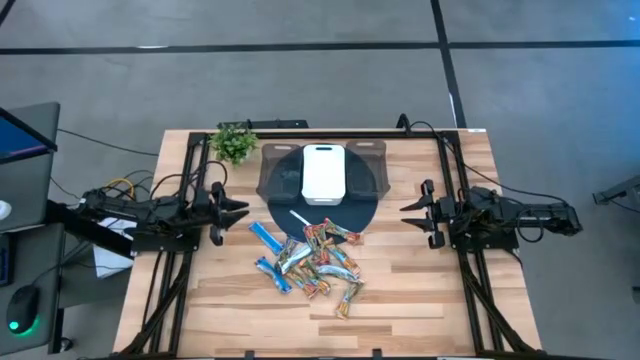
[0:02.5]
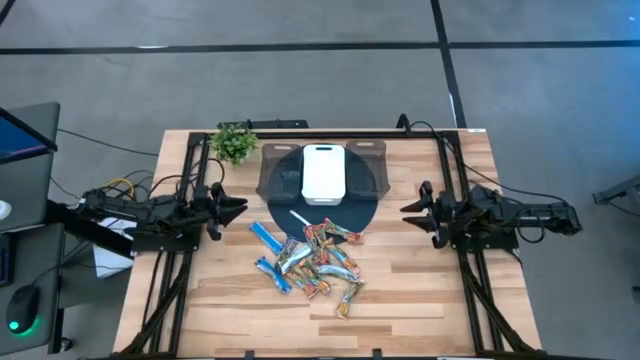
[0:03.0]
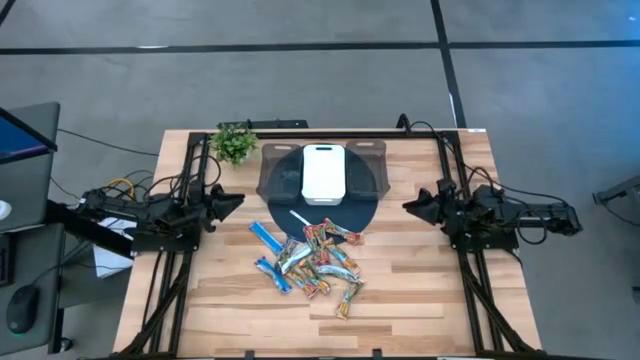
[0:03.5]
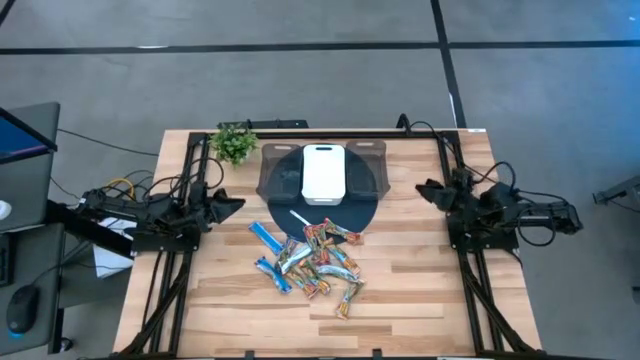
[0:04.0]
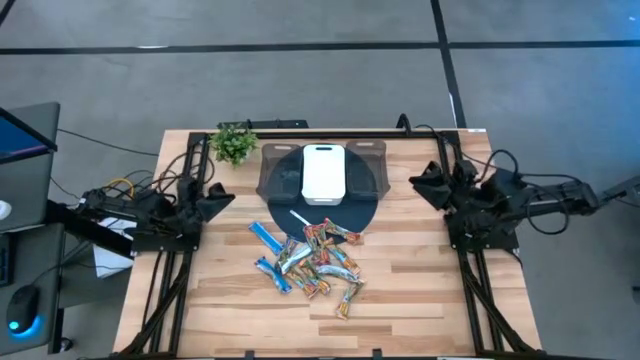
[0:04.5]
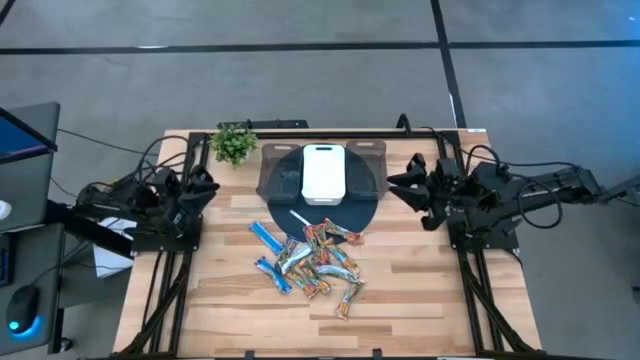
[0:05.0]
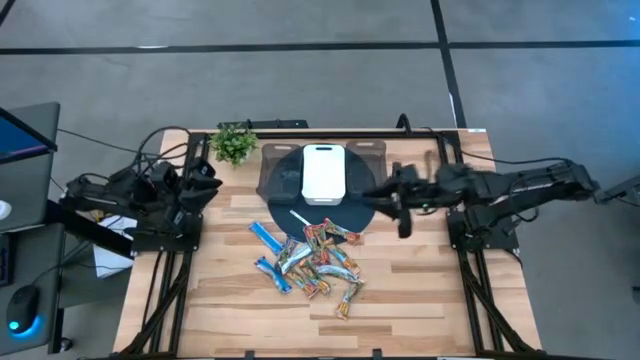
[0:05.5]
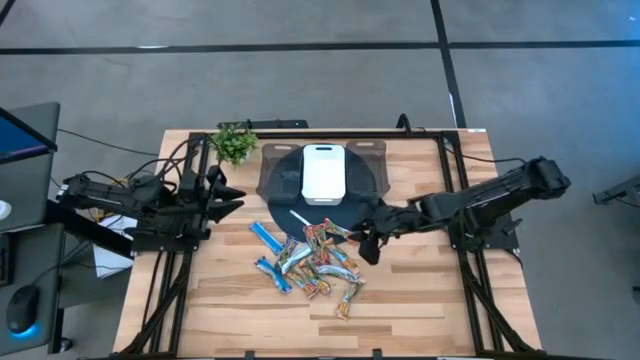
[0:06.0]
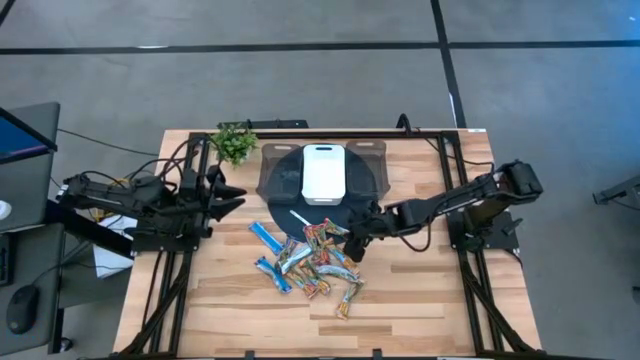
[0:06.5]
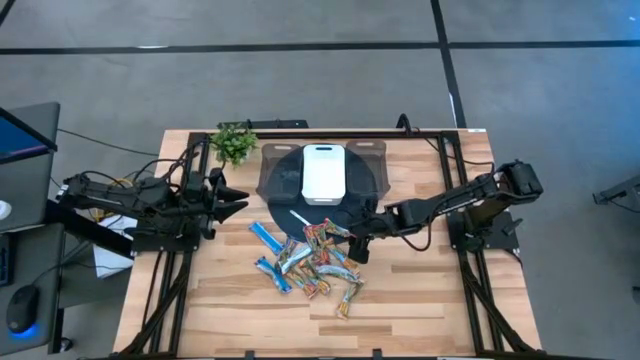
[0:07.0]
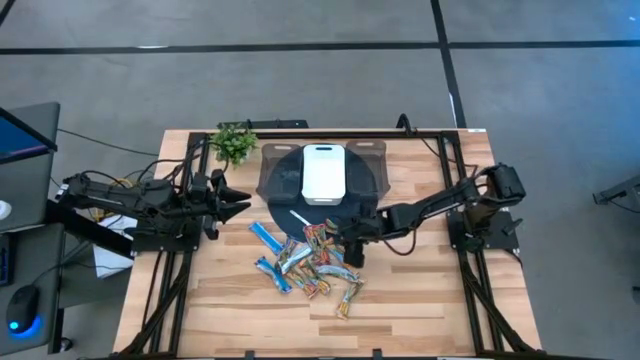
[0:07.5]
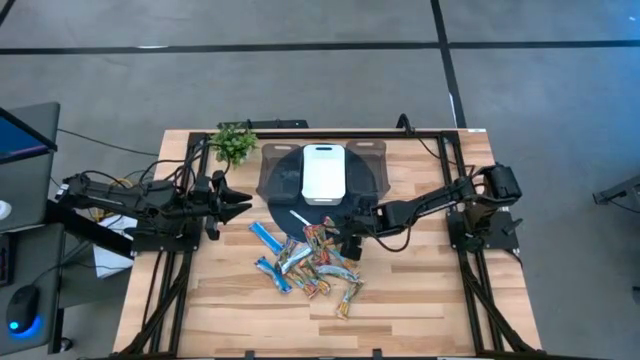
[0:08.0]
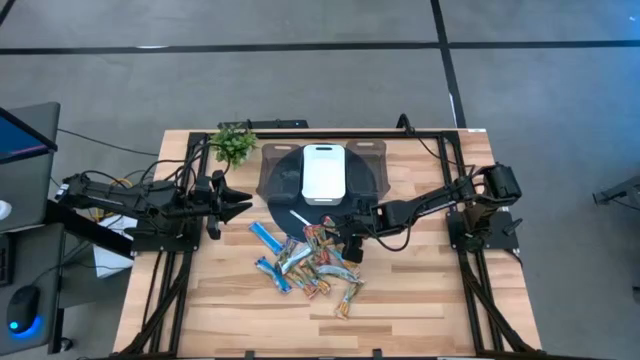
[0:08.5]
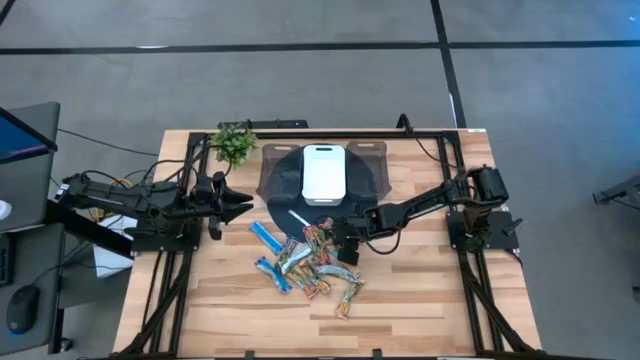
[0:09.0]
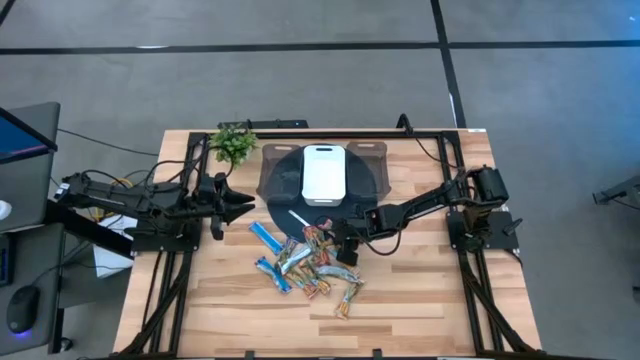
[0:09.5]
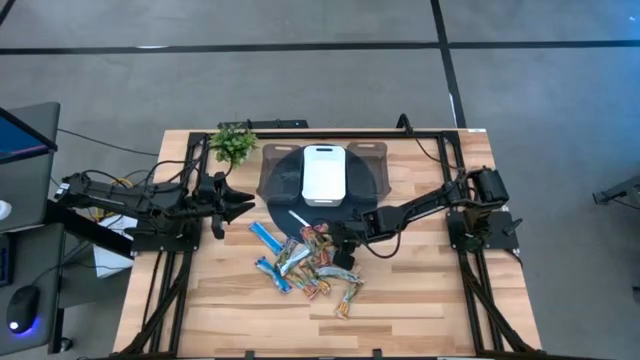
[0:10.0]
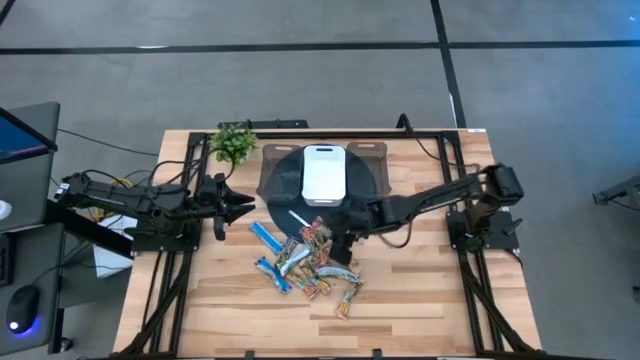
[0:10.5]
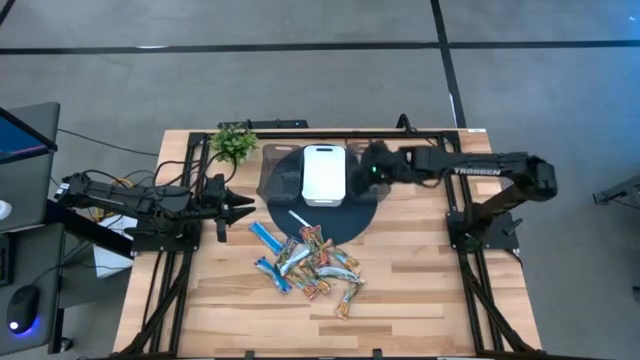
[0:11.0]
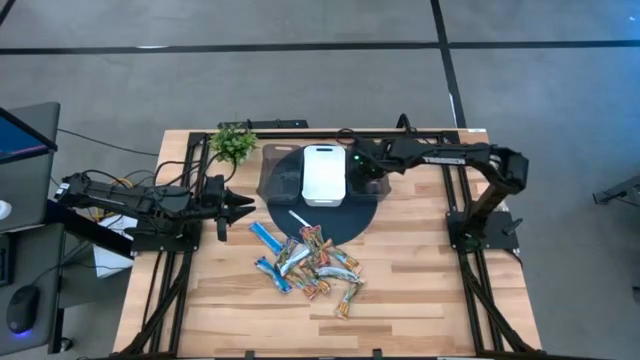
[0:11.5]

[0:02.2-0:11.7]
Task: Pick and place Granola Bars by type
Put the red granola bar into the right black bin

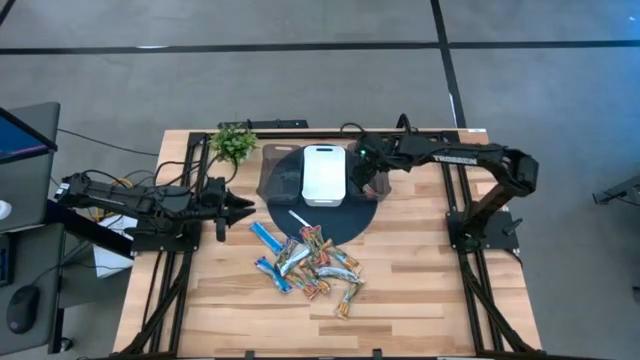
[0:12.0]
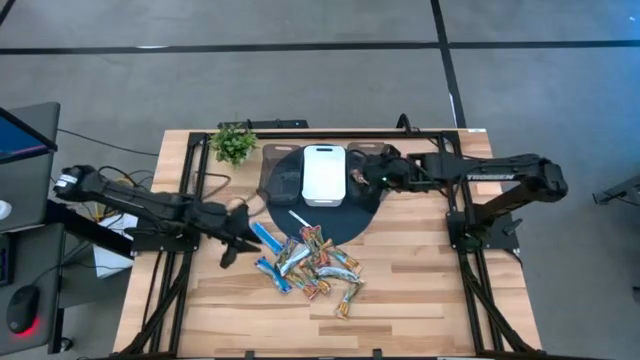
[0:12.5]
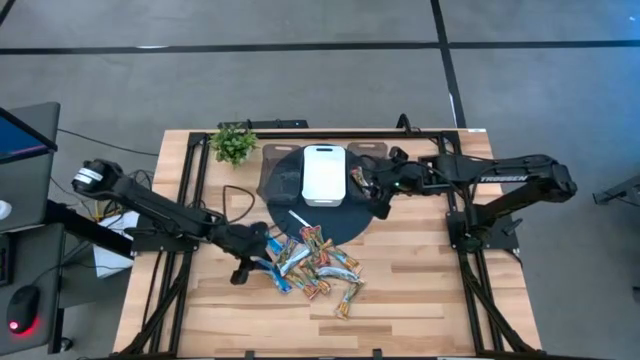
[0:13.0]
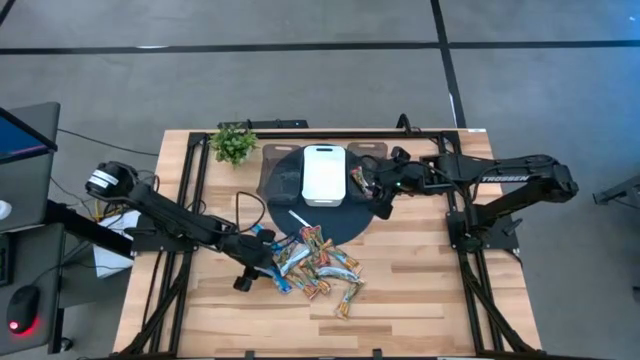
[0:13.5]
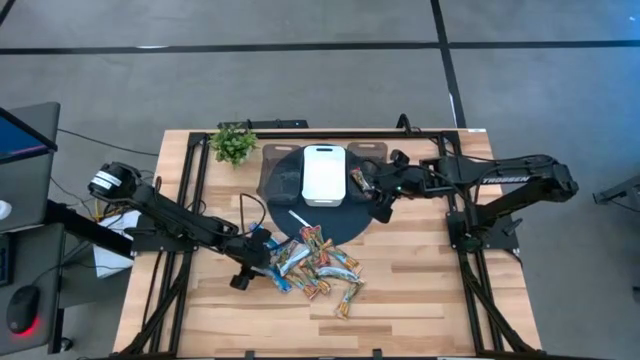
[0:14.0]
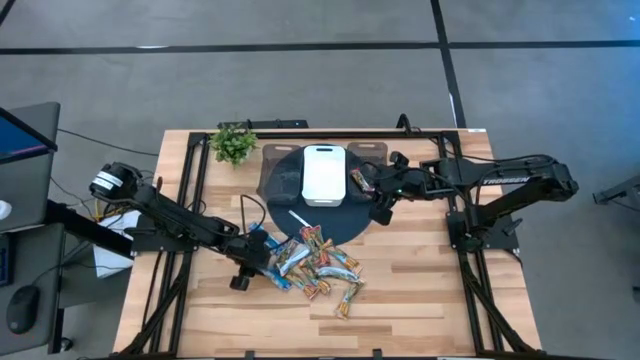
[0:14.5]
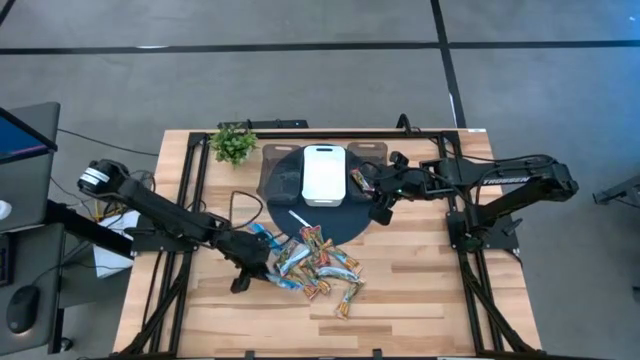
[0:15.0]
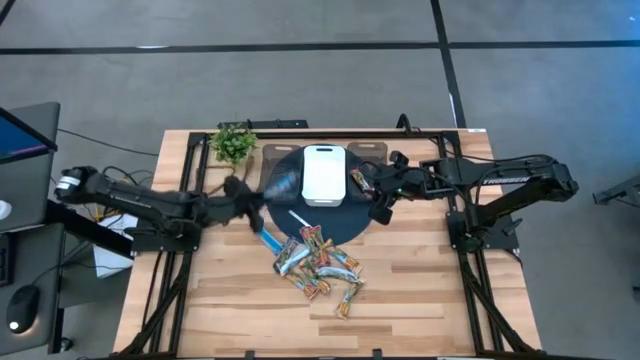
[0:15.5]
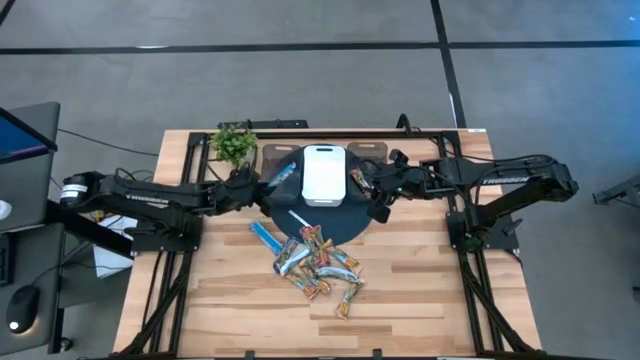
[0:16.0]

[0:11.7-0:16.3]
Put the blue granola bar into the left black bin

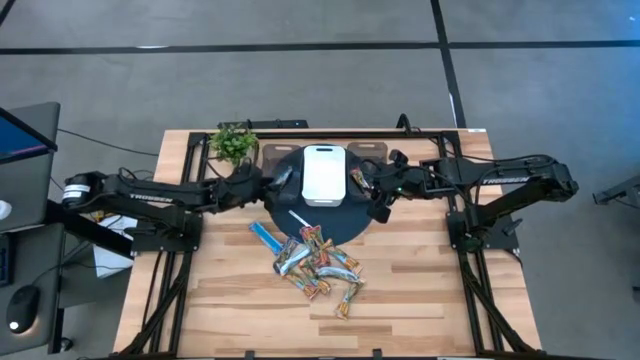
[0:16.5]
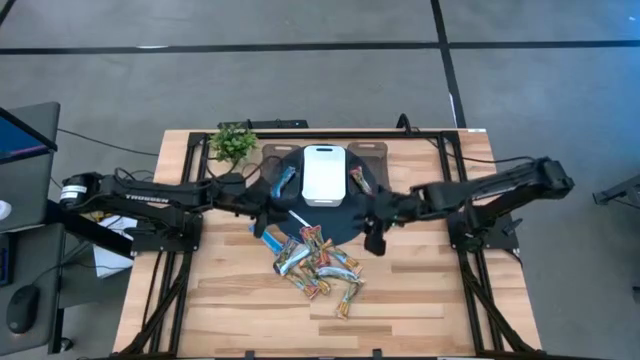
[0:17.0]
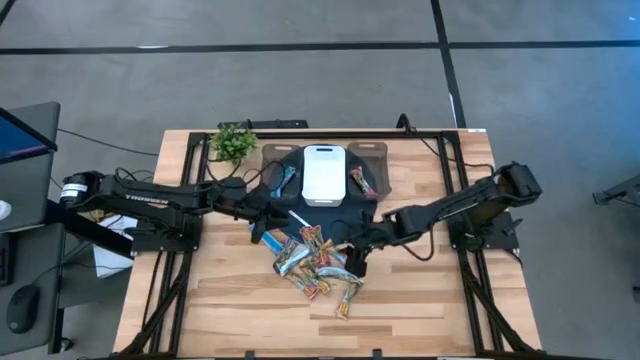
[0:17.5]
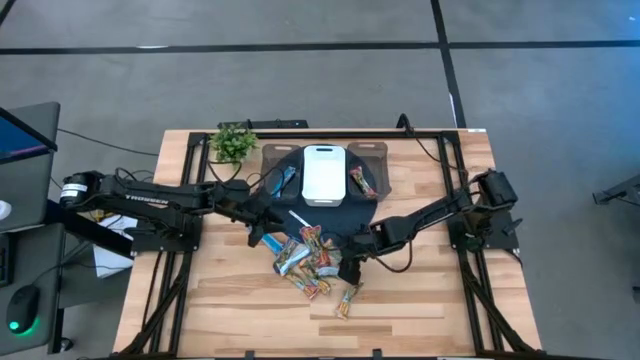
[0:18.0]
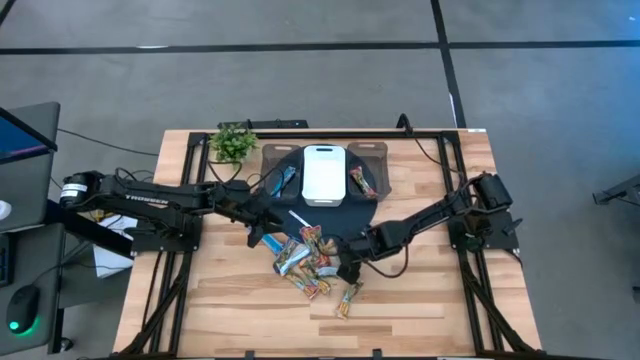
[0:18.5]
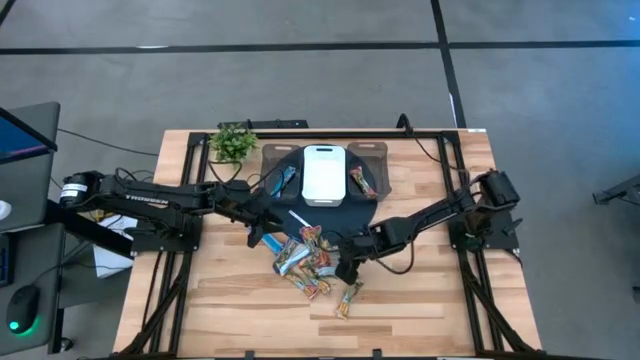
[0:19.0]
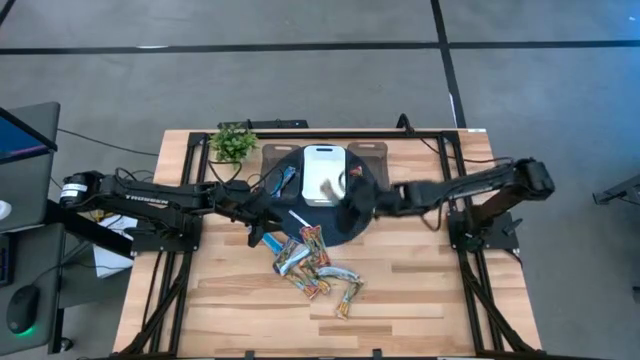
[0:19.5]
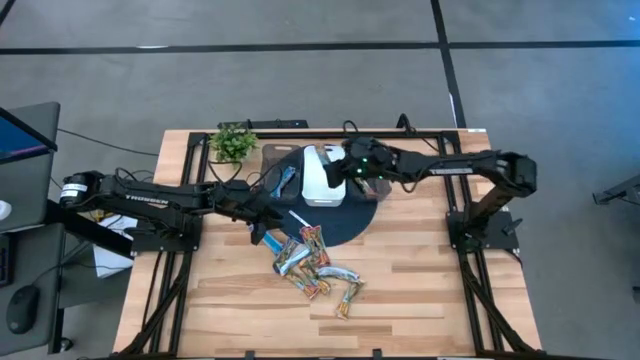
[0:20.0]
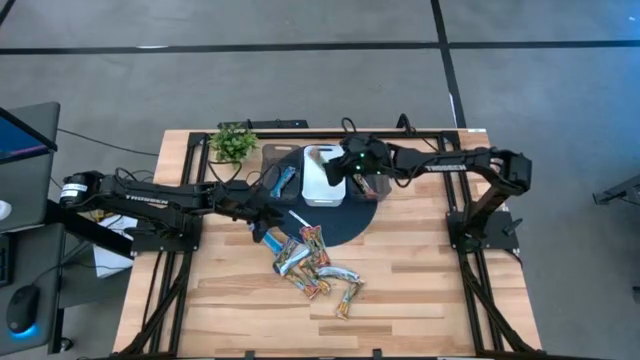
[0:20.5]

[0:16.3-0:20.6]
Put the orange granola bar into the white bin

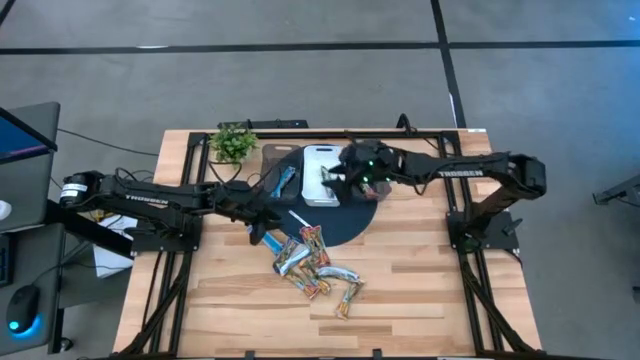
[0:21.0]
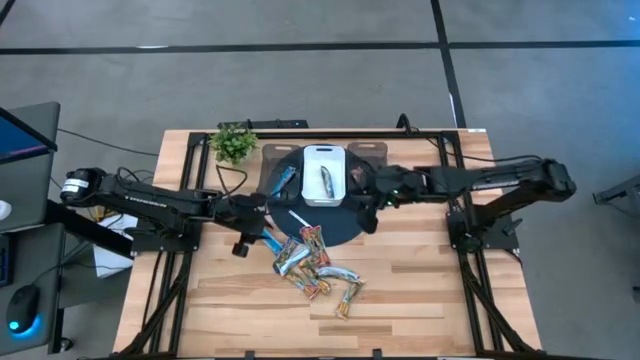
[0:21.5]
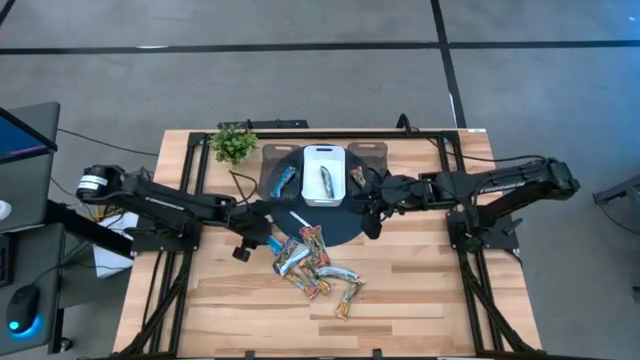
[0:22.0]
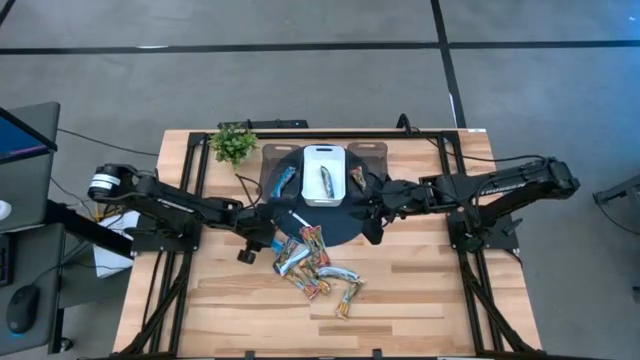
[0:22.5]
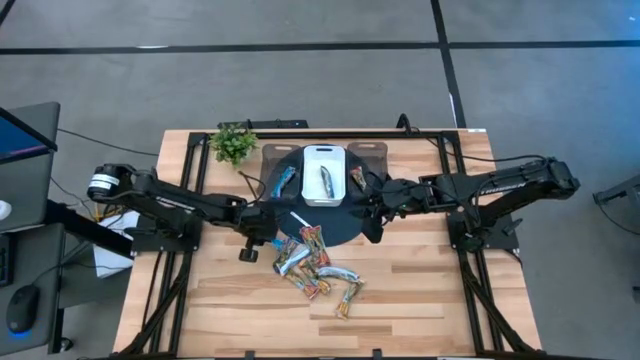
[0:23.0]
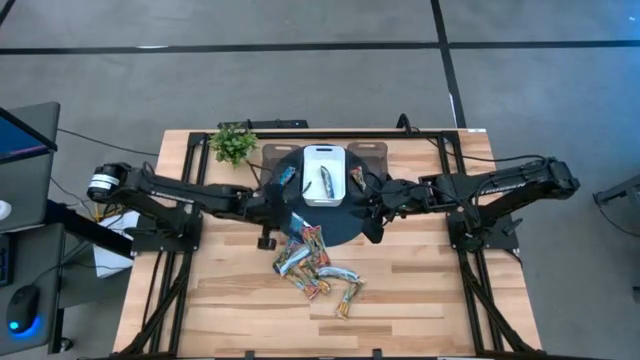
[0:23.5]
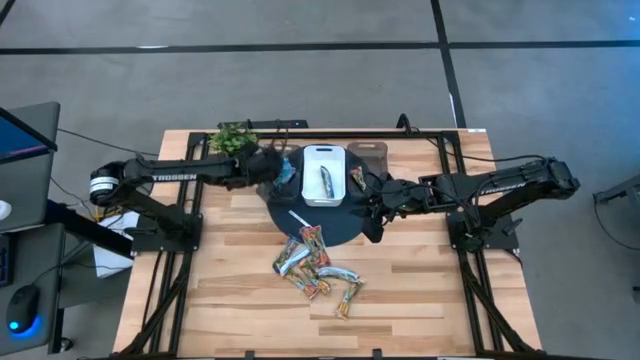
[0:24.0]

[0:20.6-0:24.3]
Put the blue granola bar into the left black bin
